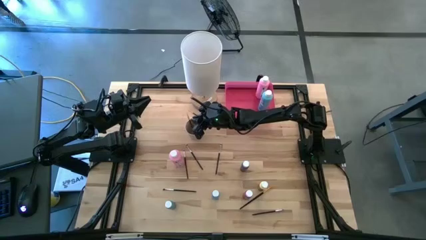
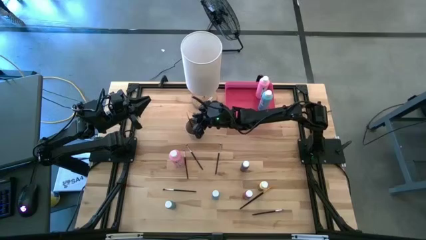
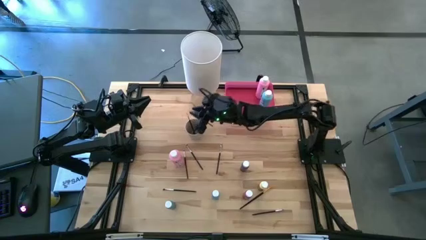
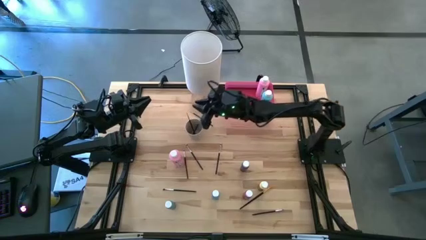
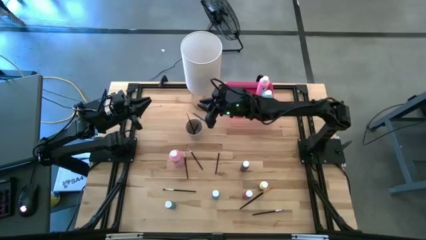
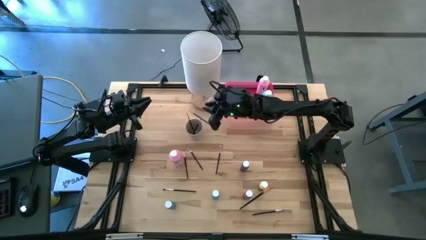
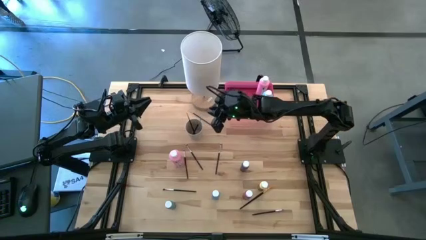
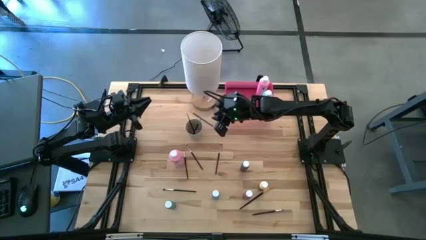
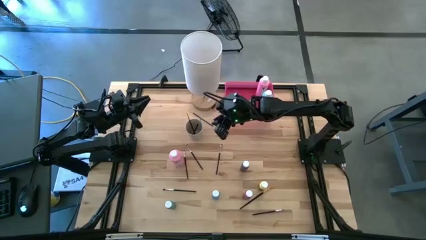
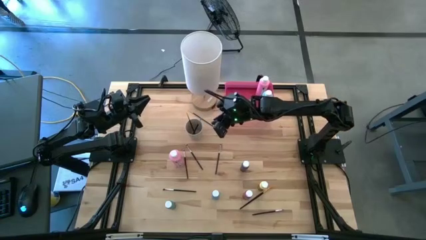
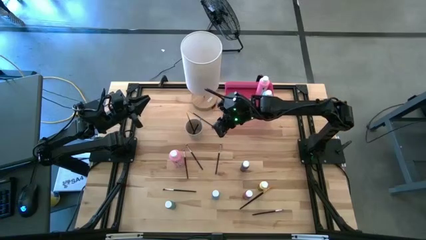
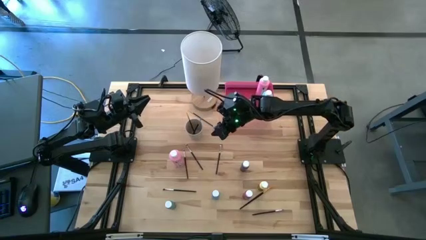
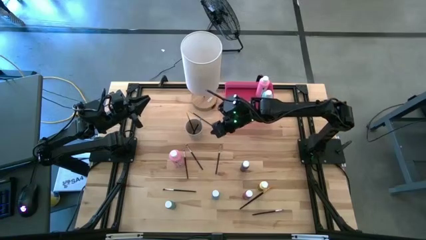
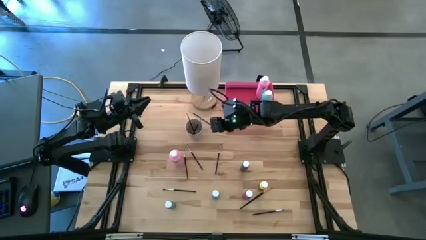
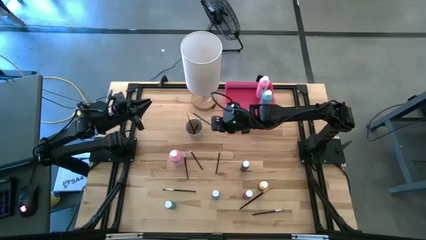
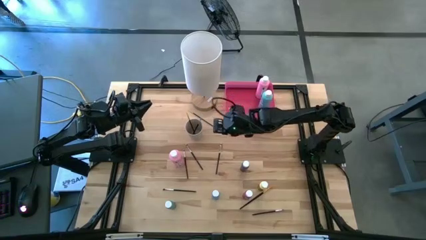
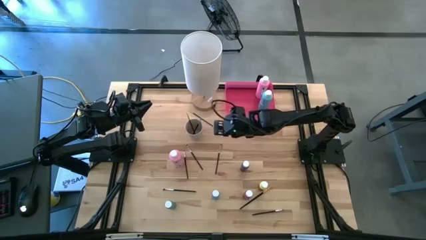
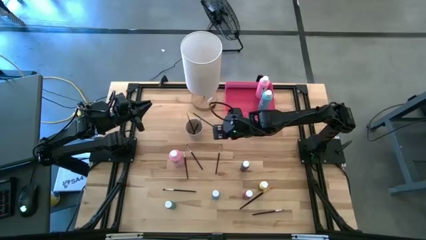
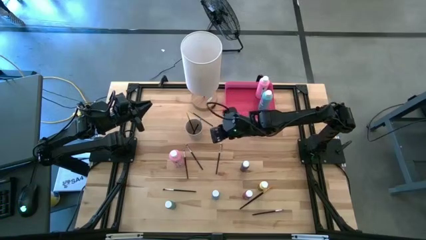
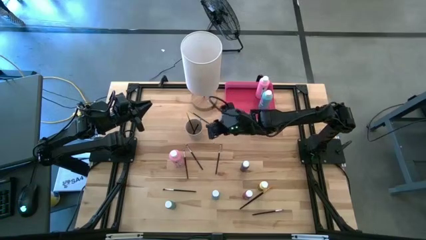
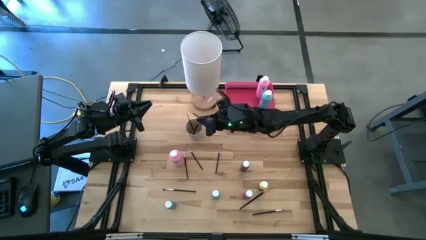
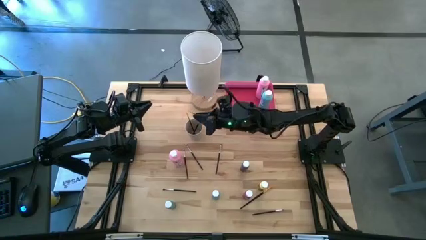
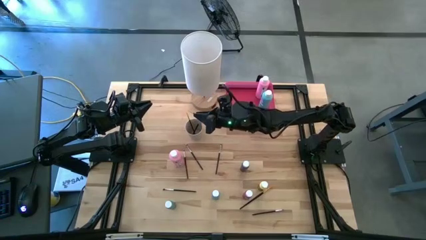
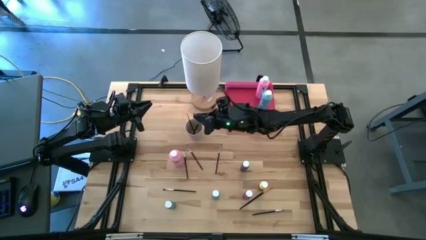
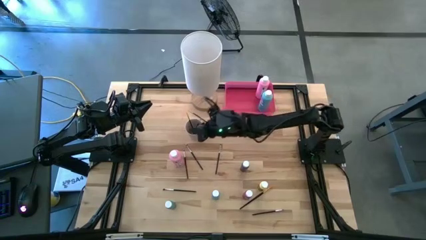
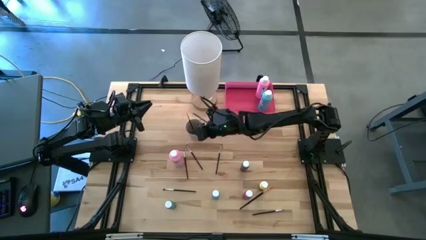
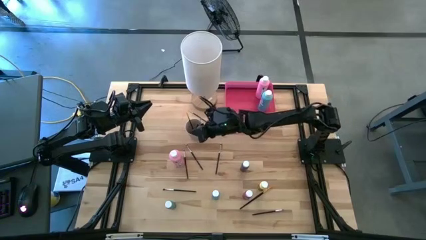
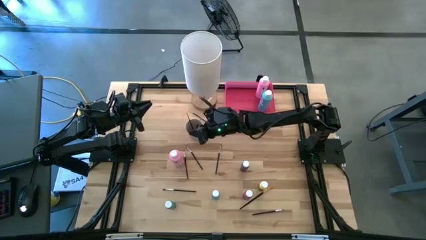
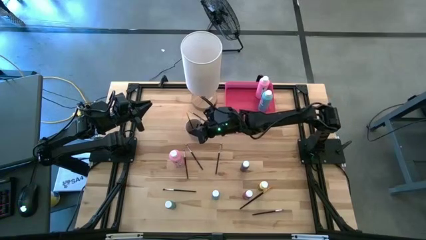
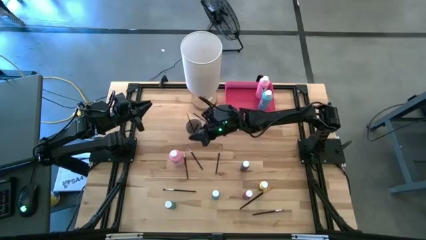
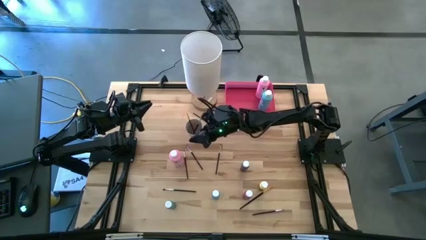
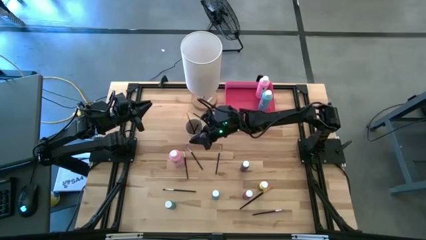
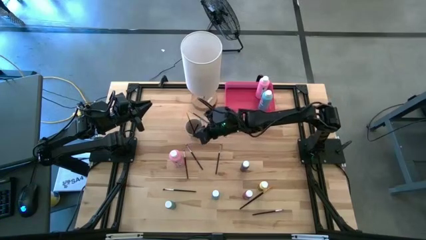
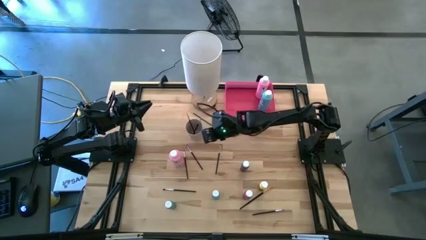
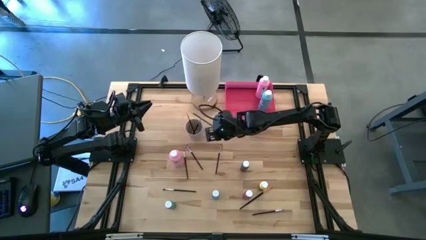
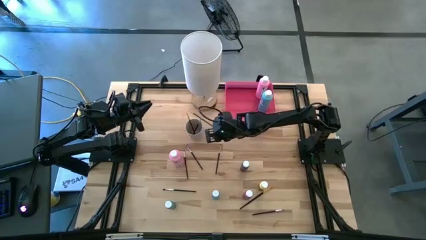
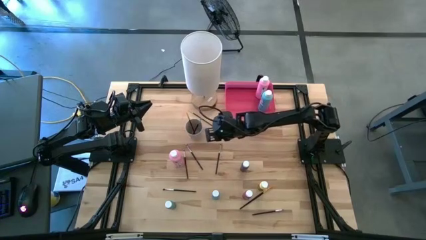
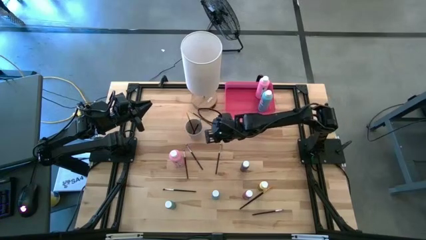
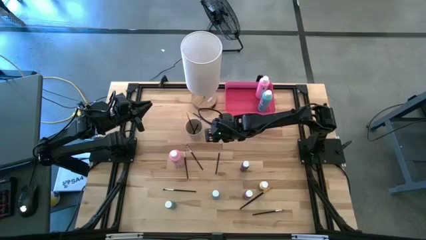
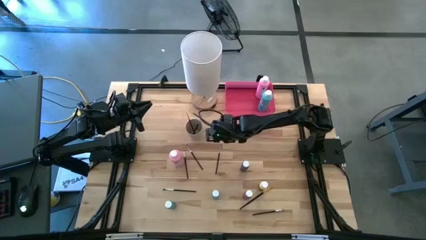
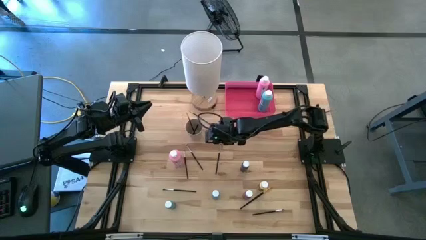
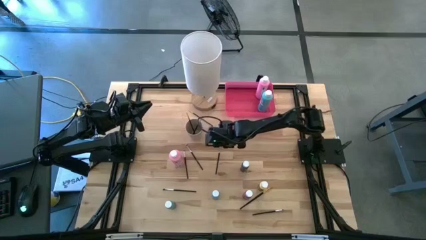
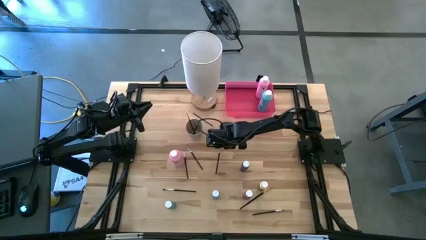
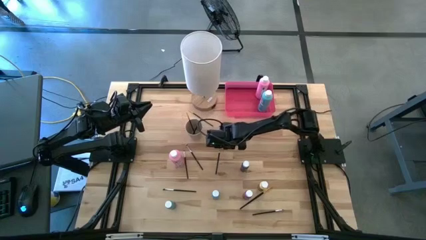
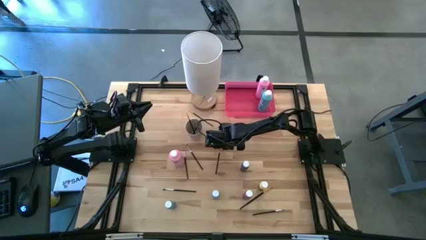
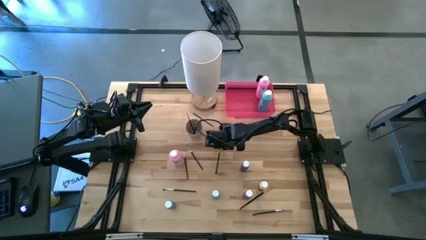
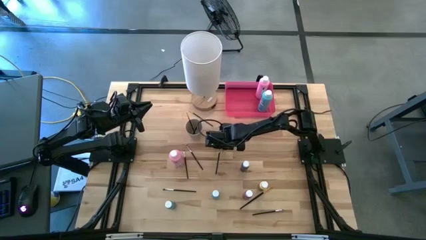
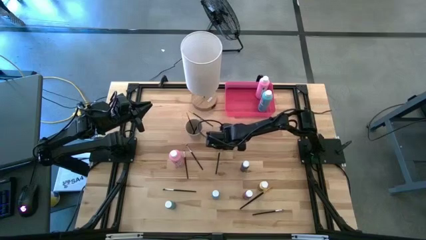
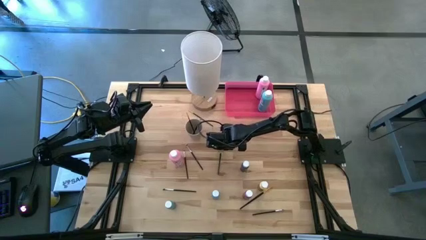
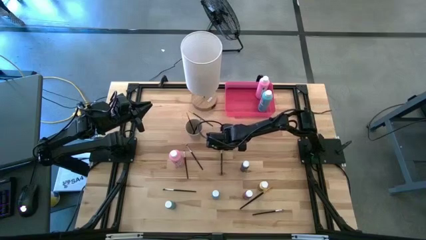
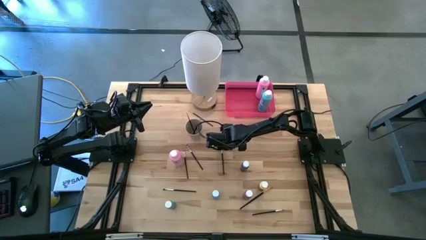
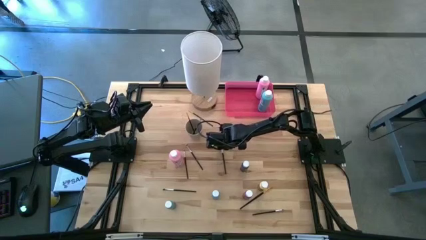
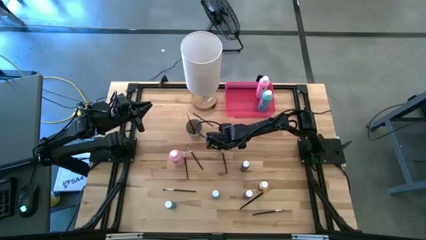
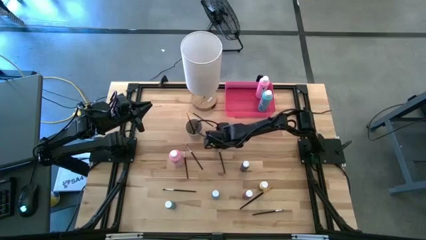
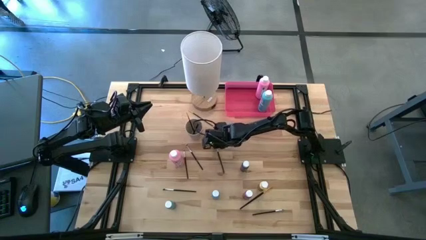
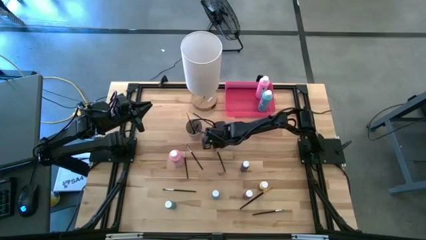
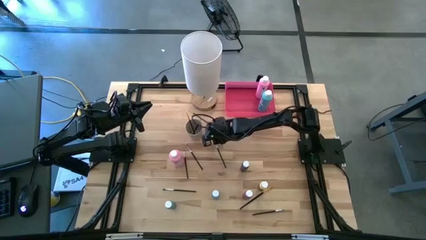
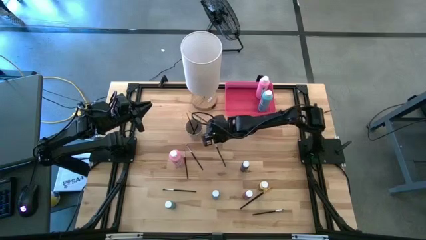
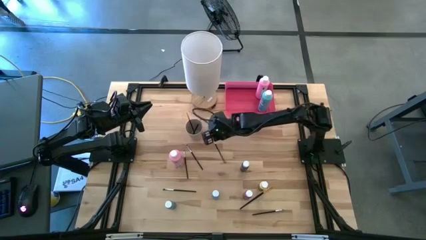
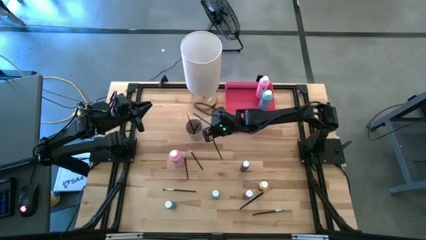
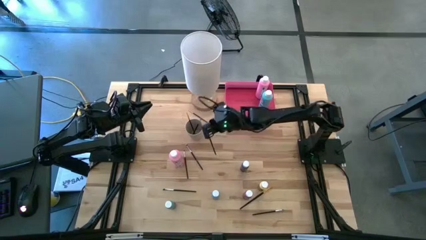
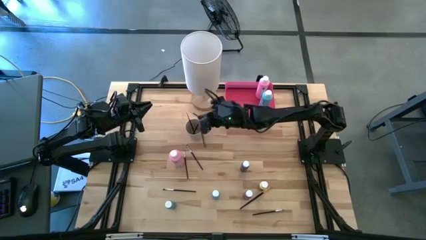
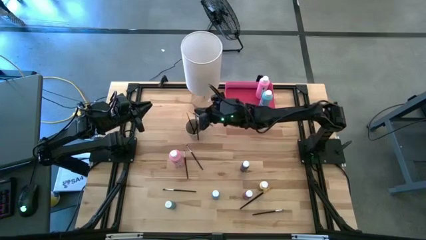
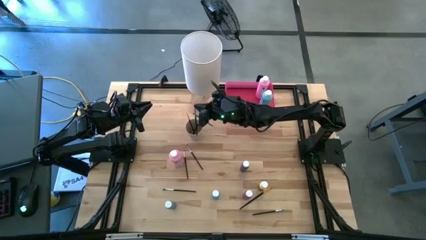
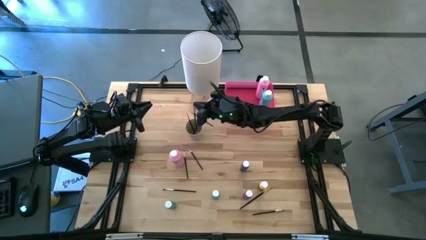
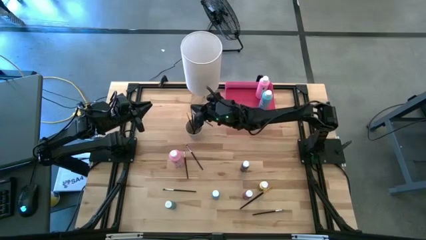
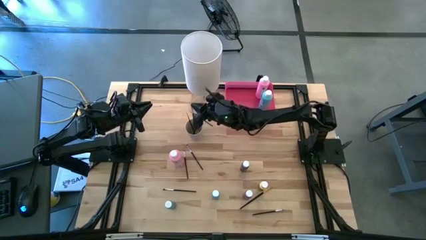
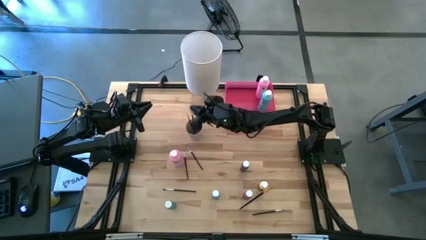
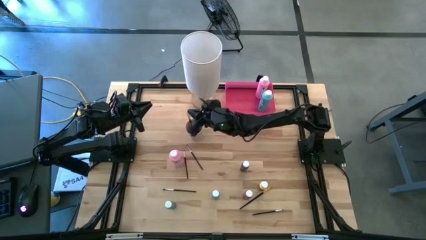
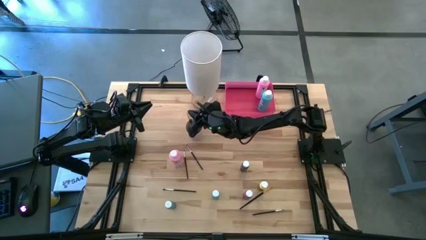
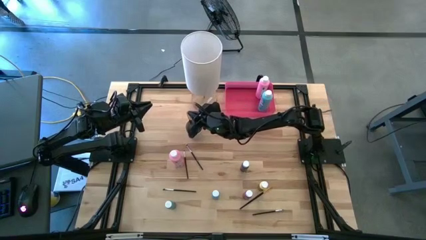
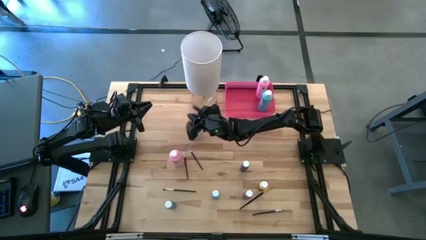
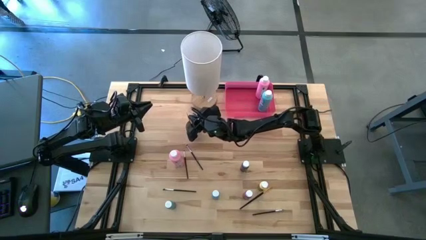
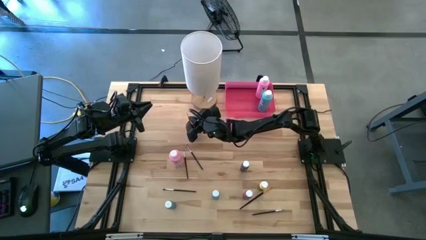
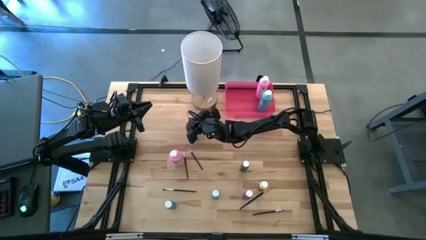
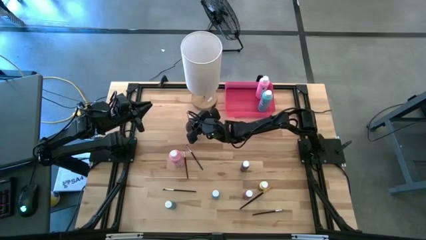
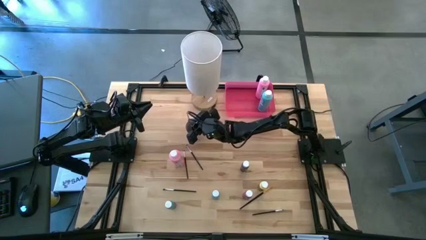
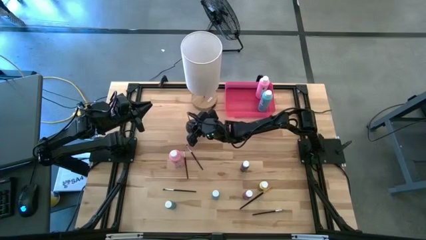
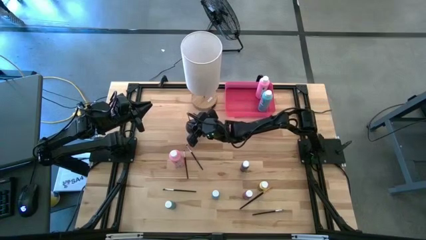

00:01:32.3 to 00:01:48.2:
Task: Pick & Place Paint Supplies
Put the silver eyeshadow brush into the white cup
